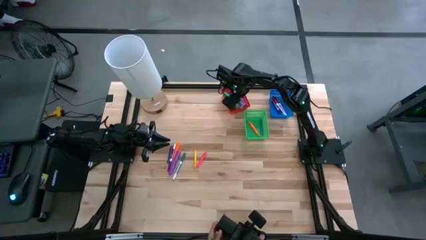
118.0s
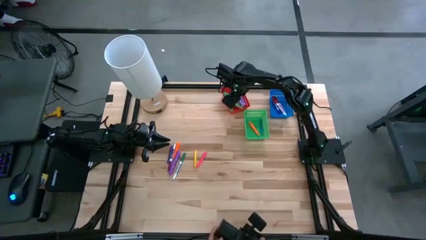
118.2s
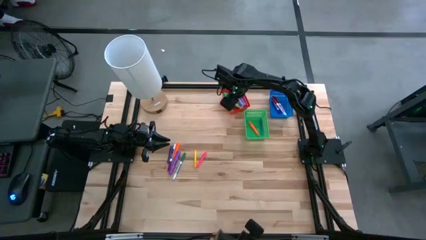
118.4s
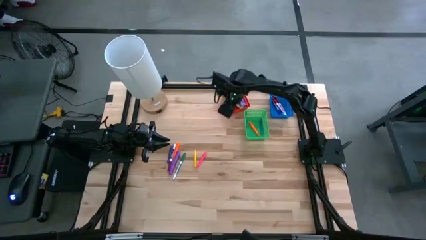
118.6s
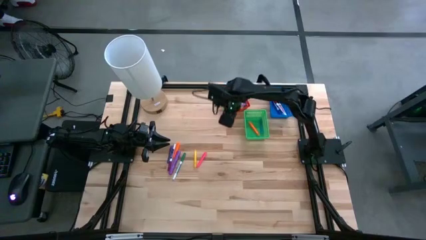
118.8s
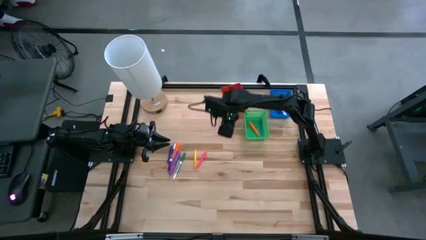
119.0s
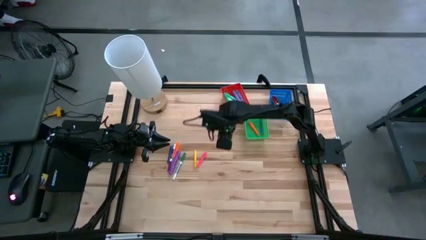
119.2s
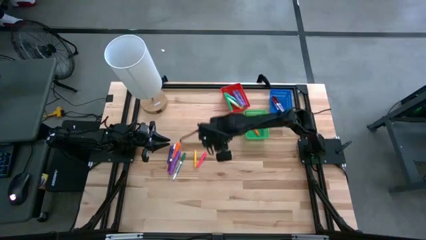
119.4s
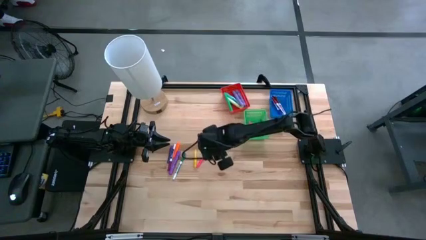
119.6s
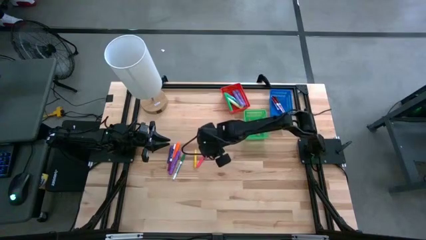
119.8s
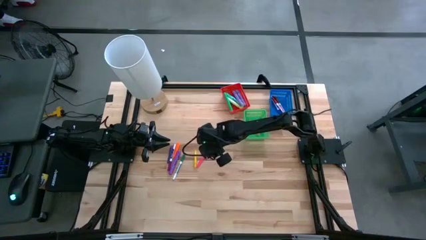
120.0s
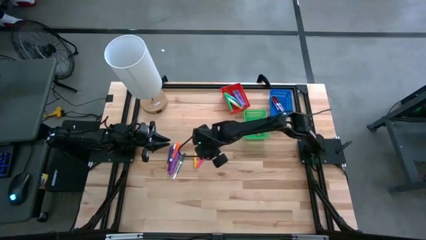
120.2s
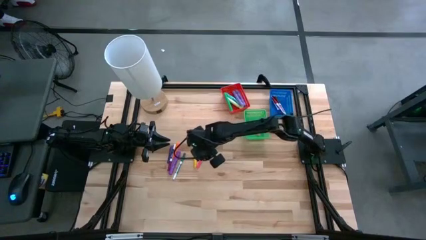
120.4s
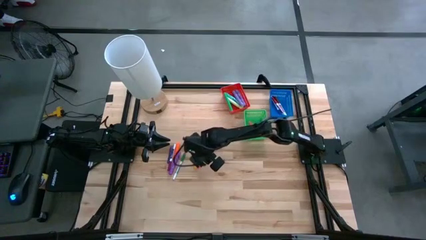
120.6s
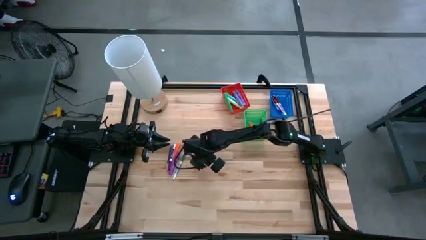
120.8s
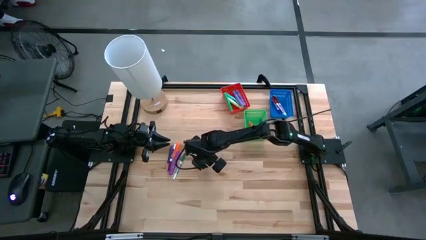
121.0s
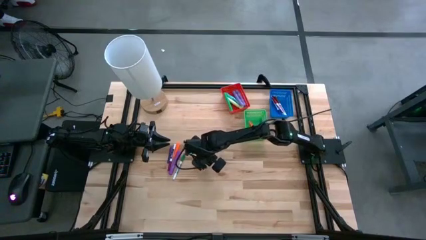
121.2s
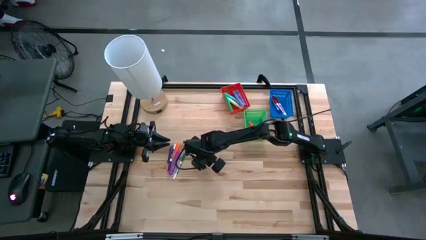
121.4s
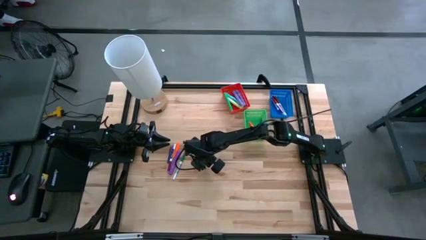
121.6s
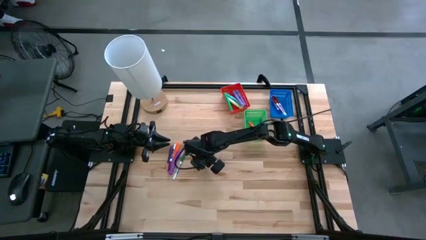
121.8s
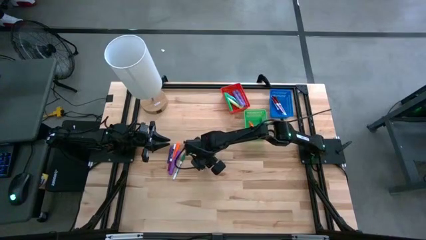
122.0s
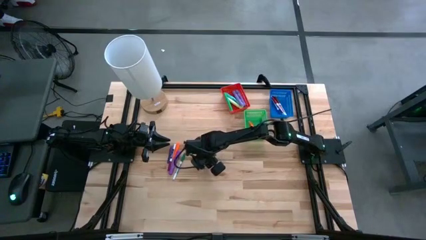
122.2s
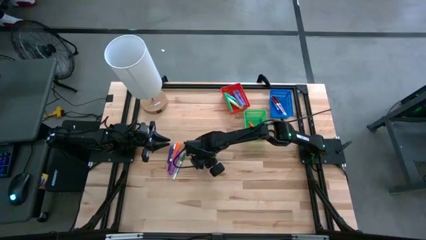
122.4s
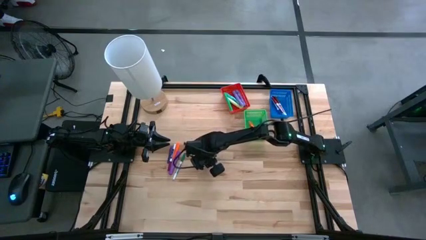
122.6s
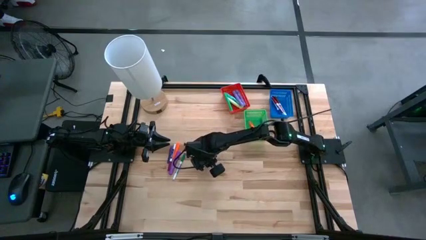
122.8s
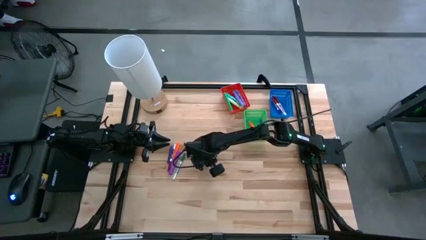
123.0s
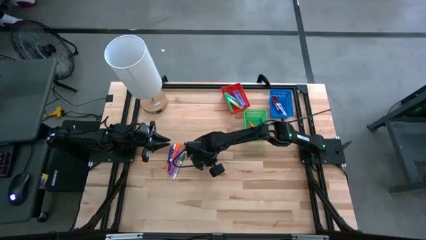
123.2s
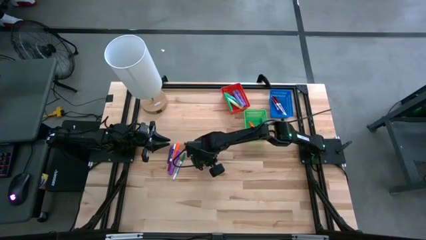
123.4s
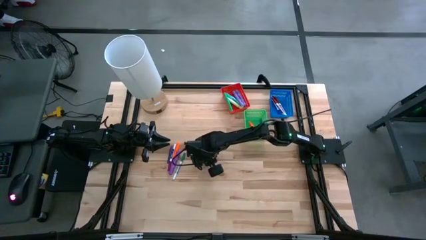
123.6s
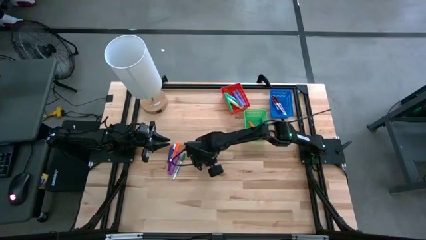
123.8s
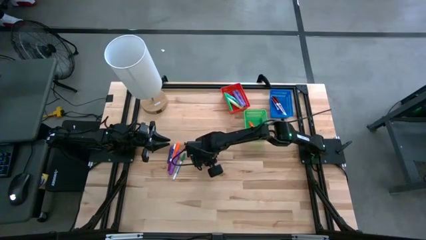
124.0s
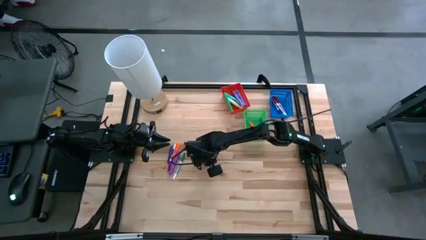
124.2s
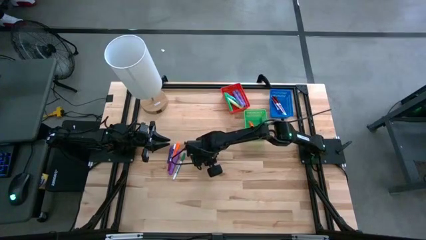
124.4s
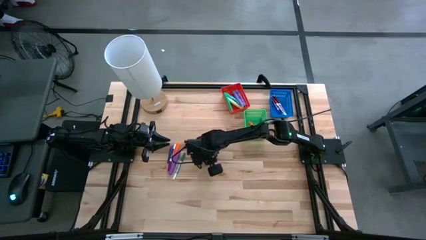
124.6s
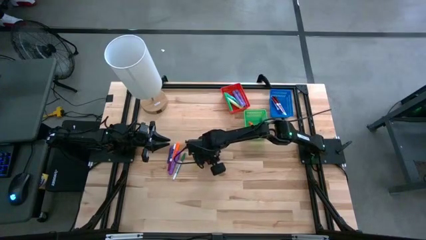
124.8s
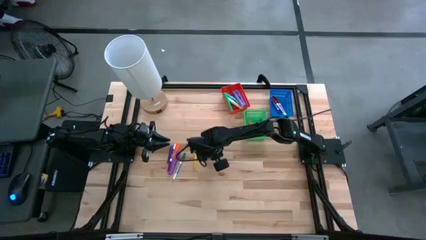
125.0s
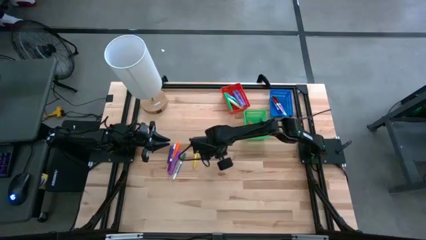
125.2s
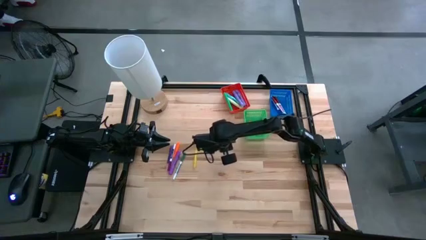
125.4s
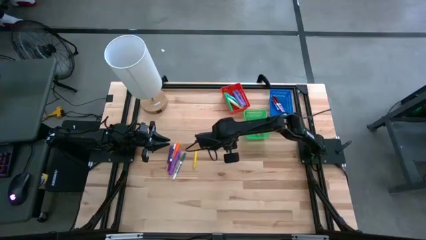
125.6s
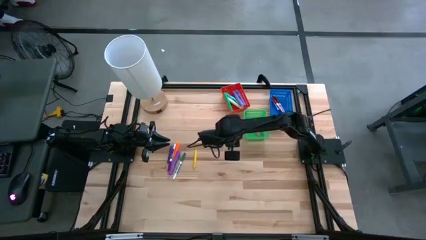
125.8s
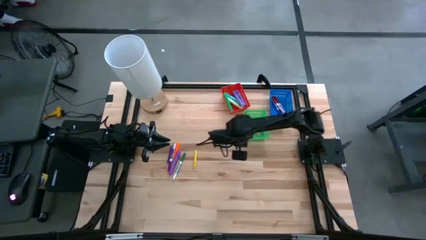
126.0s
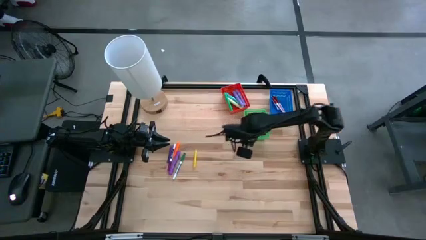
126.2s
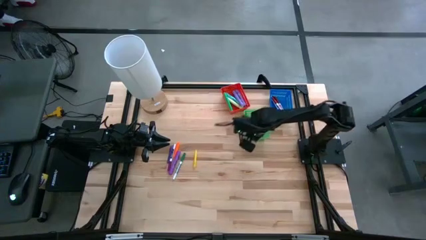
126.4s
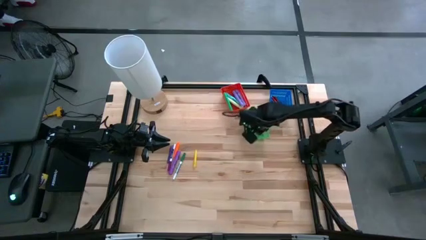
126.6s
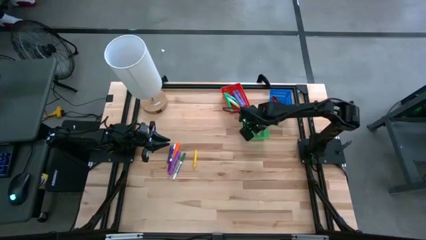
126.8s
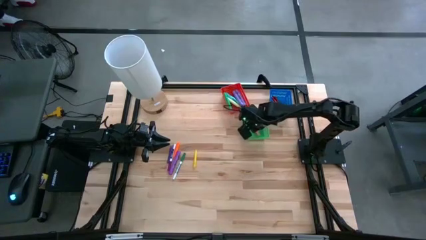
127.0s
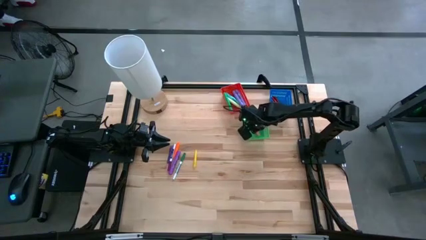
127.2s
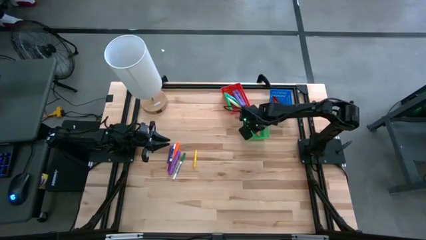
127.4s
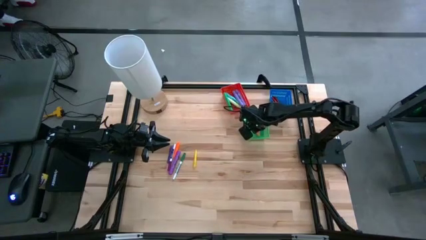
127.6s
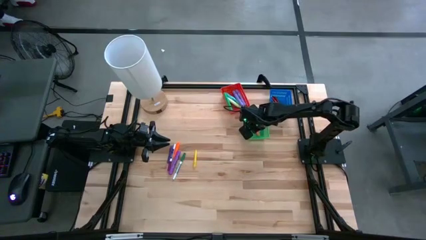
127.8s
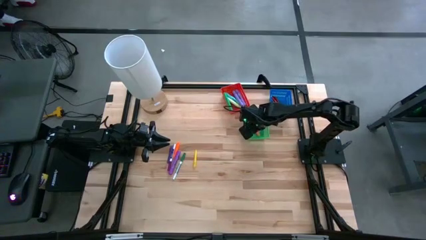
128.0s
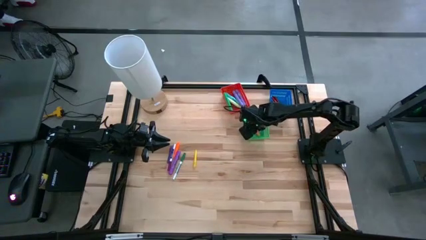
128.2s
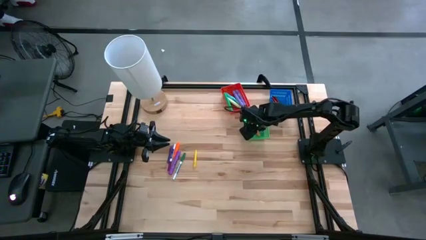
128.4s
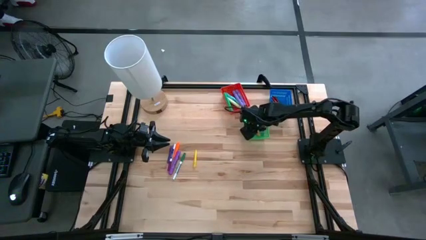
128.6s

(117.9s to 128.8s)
Task: Pick & Place Markers
Put the pink pen in the green bin

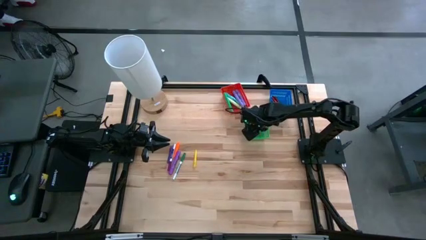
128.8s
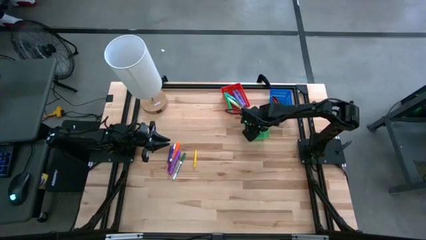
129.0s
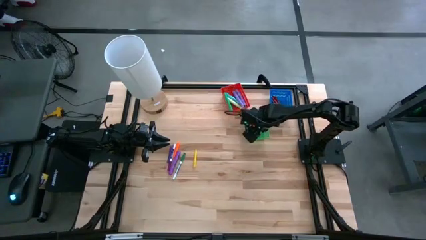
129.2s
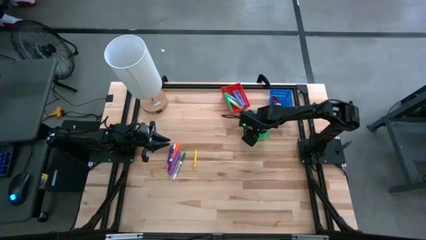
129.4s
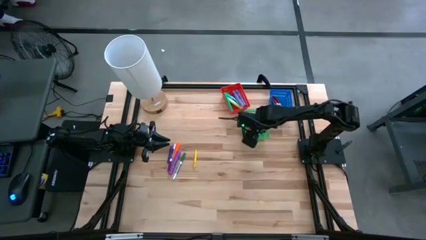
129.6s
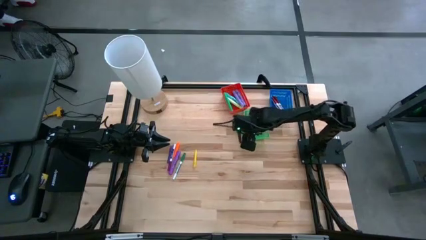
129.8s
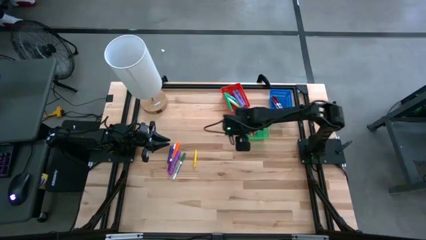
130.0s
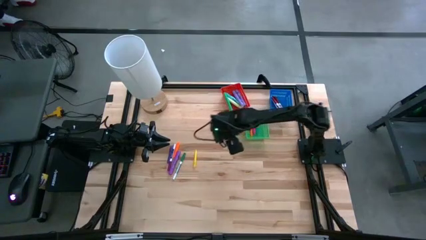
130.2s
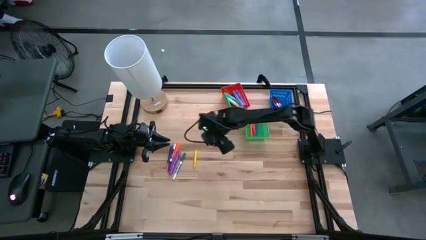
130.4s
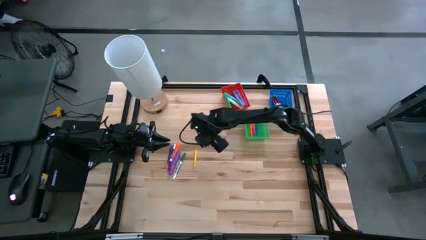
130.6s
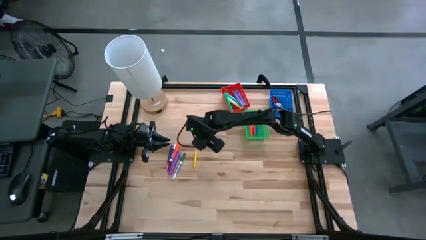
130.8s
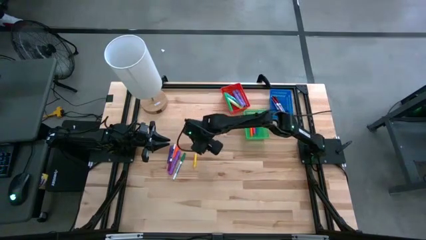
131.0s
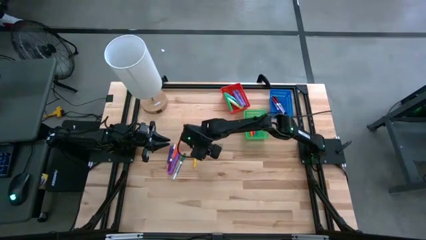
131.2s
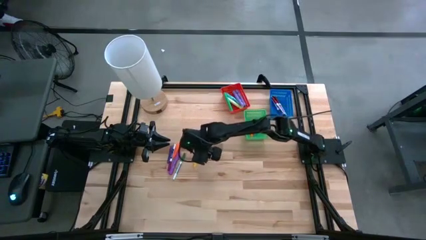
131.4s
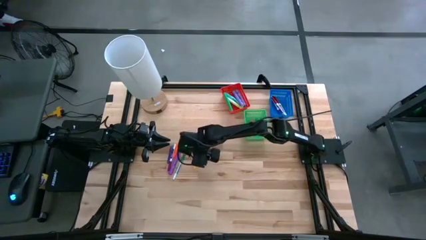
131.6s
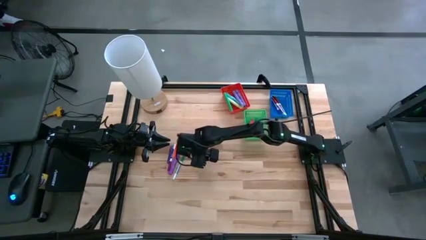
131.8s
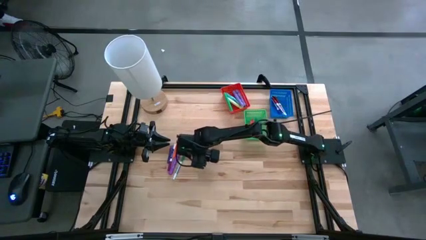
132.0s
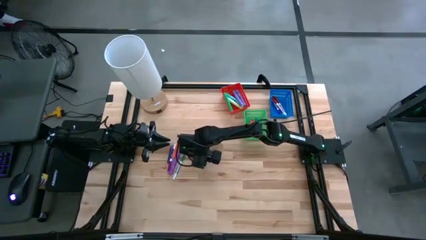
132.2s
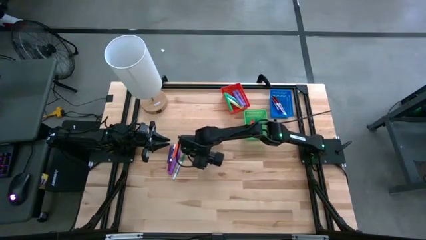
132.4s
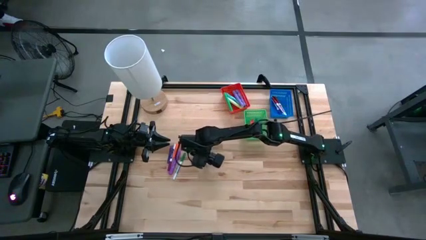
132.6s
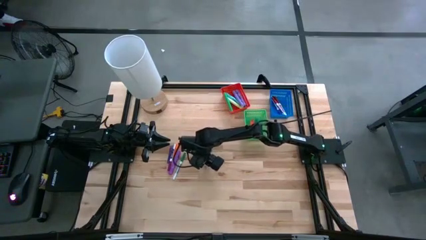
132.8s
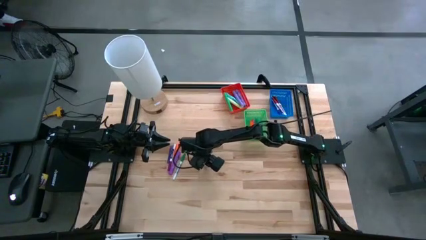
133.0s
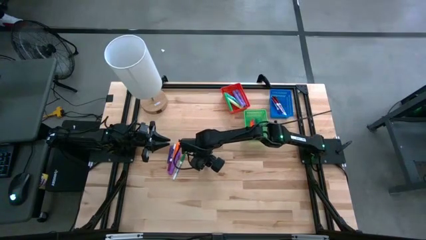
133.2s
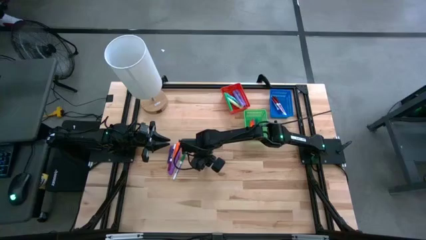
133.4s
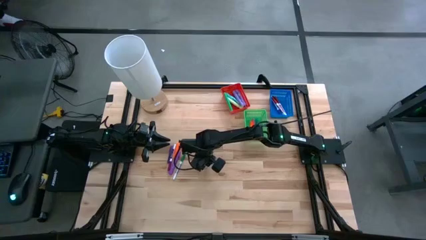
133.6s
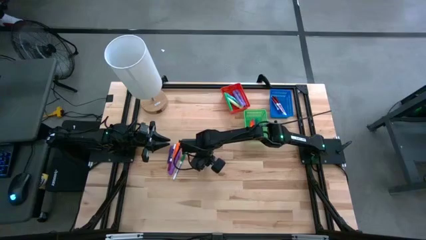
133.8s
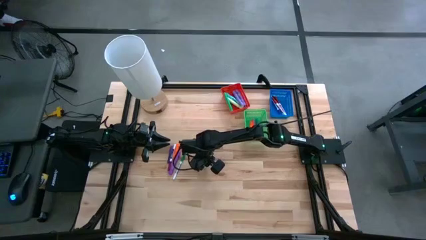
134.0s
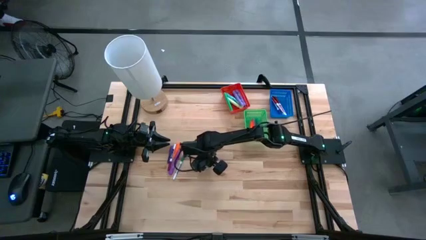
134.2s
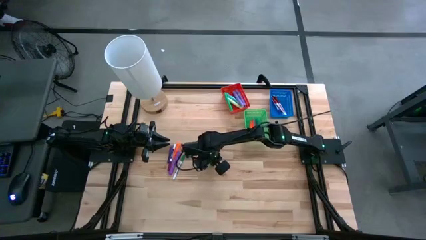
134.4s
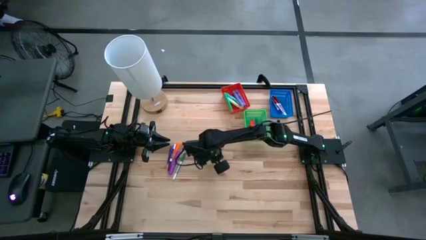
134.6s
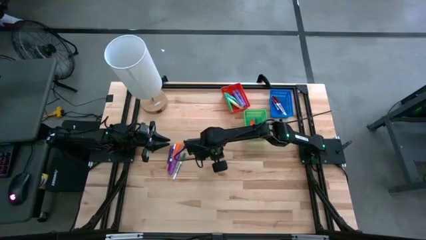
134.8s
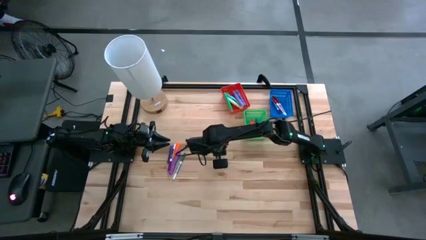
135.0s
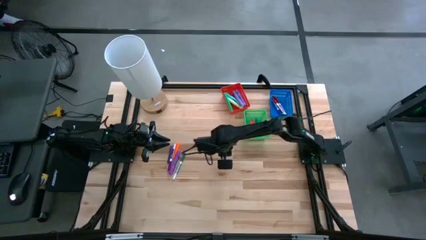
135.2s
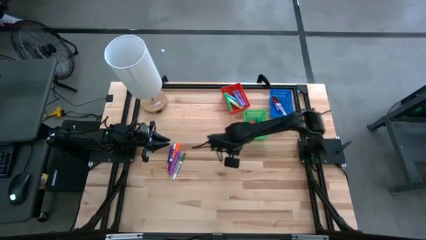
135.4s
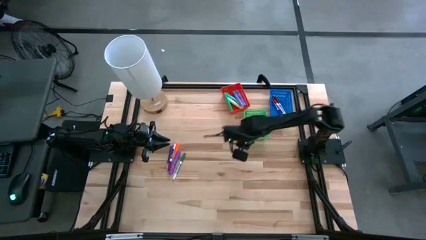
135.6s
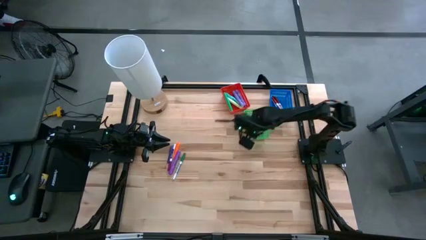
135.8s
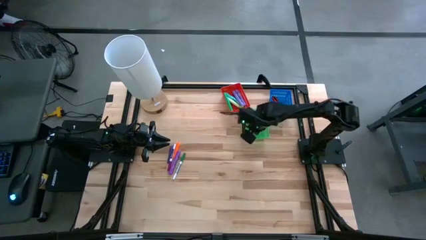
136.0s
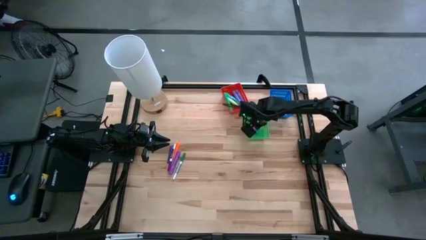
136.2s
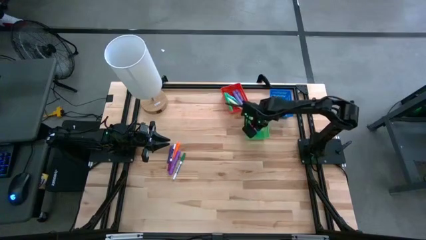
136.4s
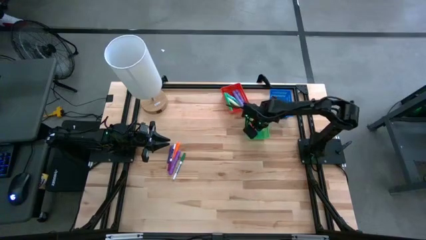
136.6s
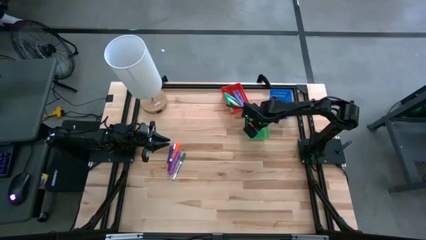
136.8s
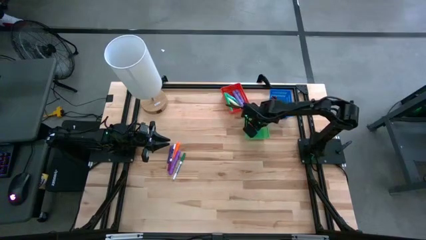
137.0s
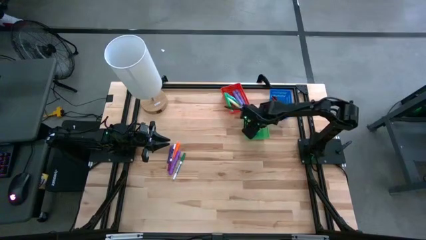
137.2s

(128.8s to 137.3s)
Put the yellow pen in the green bin
